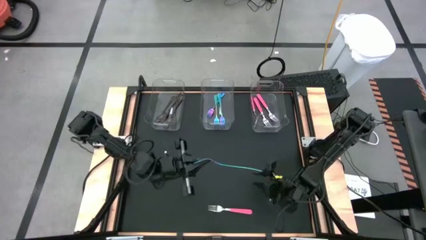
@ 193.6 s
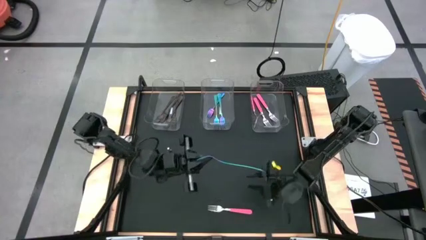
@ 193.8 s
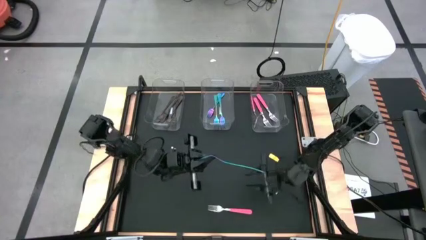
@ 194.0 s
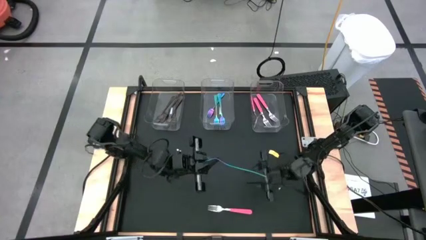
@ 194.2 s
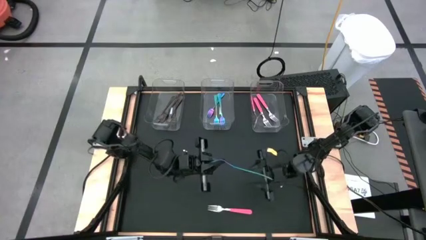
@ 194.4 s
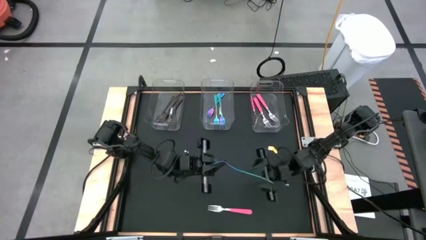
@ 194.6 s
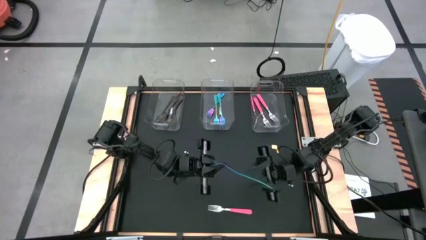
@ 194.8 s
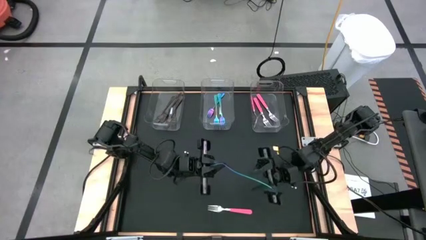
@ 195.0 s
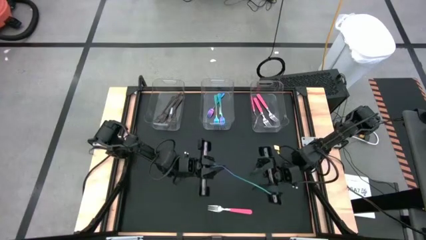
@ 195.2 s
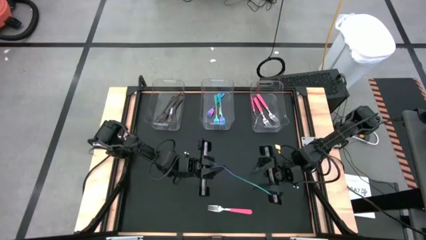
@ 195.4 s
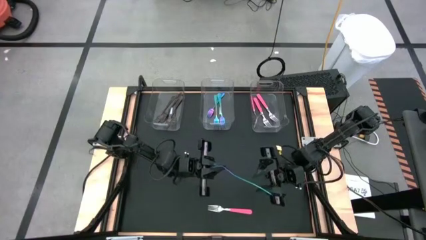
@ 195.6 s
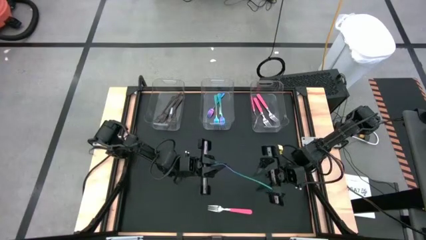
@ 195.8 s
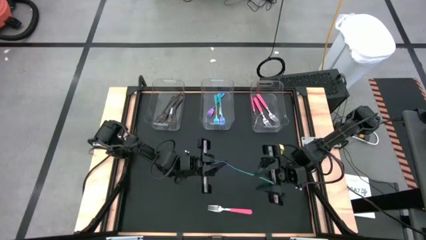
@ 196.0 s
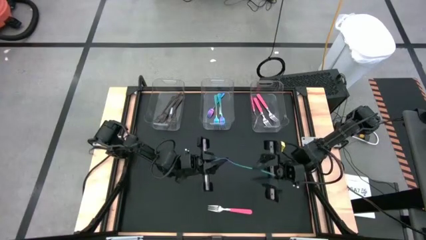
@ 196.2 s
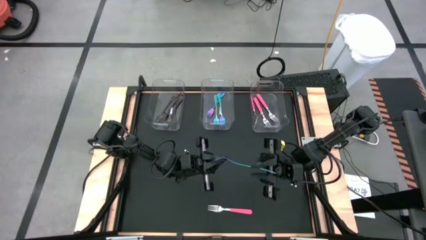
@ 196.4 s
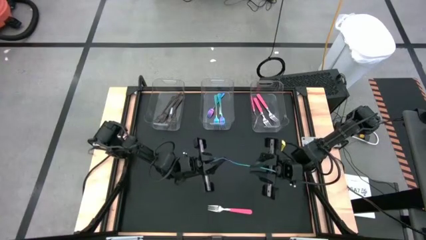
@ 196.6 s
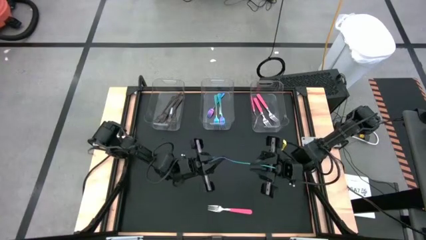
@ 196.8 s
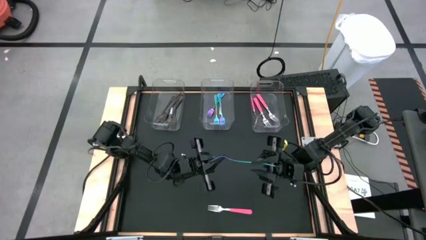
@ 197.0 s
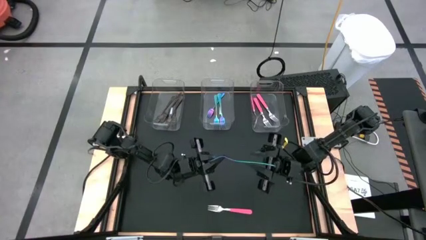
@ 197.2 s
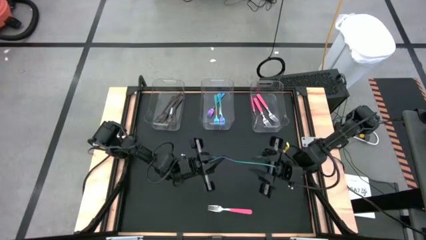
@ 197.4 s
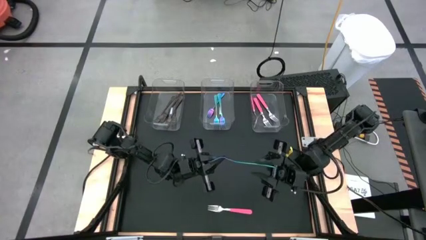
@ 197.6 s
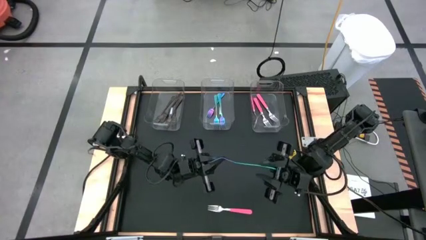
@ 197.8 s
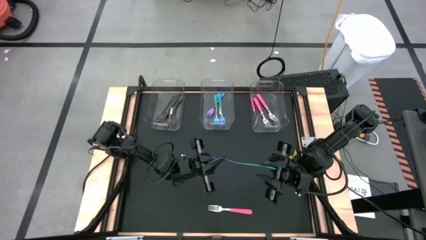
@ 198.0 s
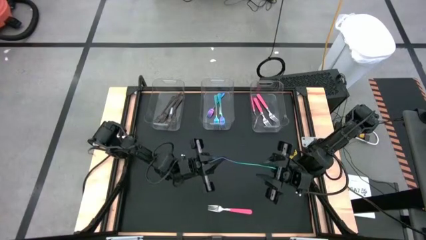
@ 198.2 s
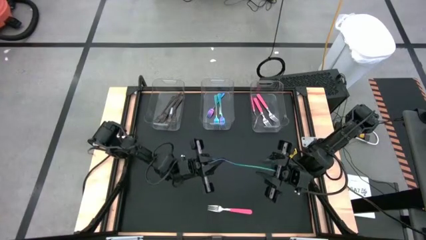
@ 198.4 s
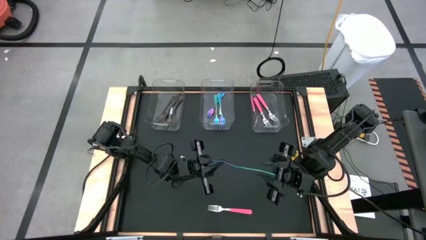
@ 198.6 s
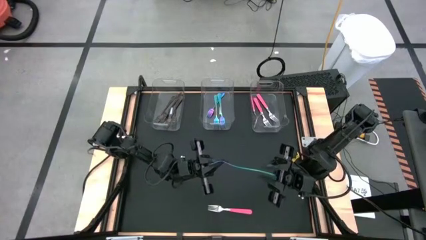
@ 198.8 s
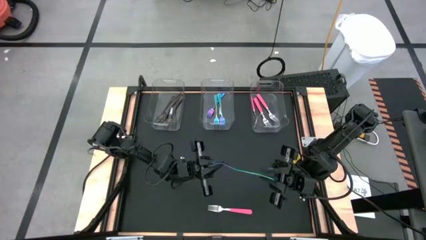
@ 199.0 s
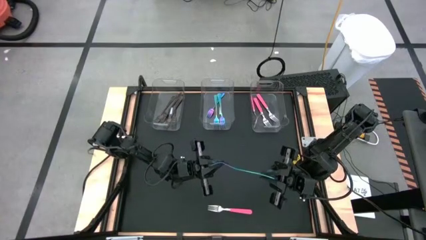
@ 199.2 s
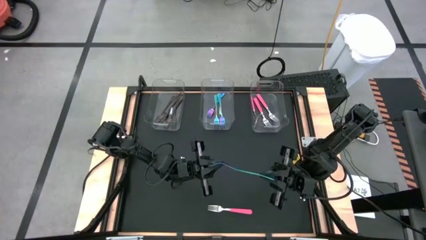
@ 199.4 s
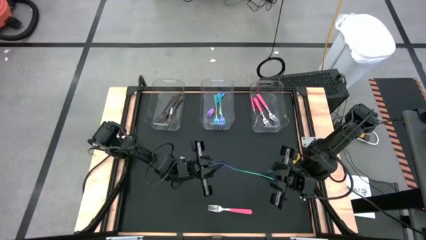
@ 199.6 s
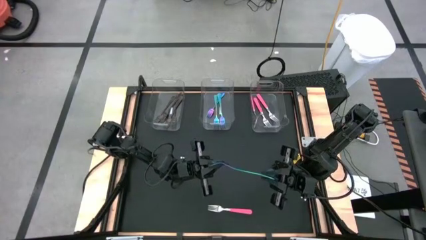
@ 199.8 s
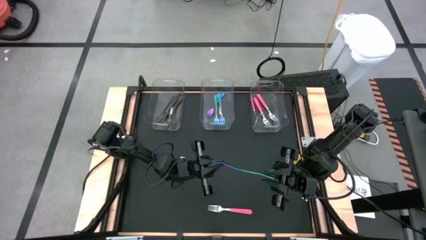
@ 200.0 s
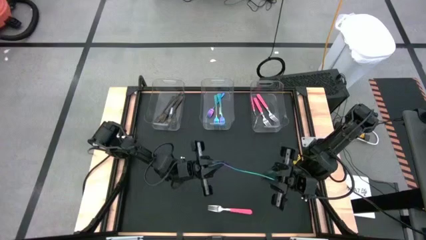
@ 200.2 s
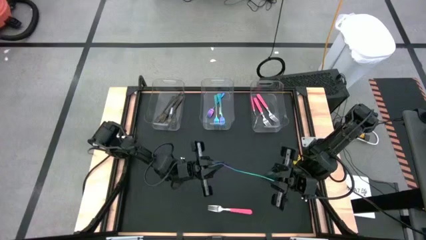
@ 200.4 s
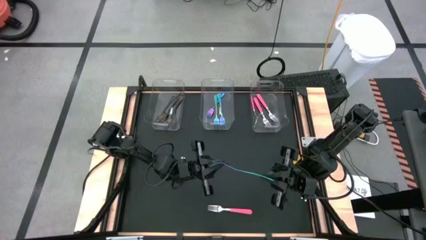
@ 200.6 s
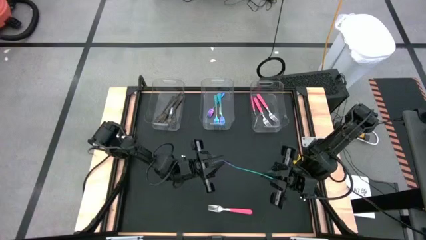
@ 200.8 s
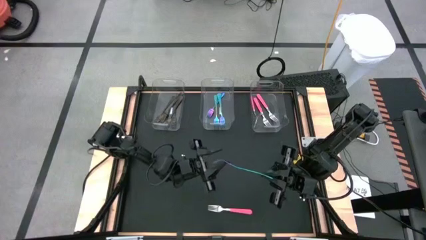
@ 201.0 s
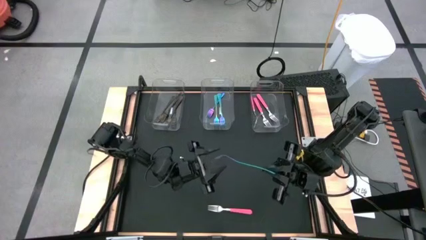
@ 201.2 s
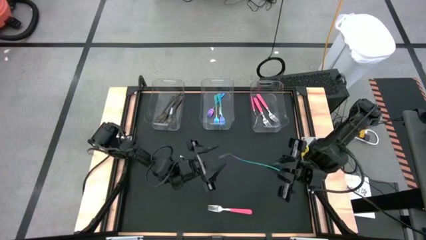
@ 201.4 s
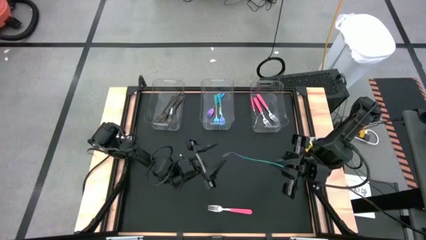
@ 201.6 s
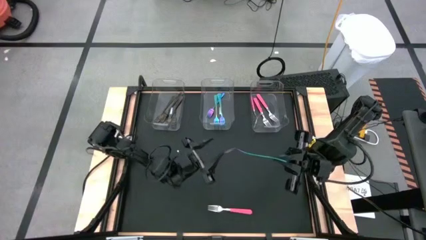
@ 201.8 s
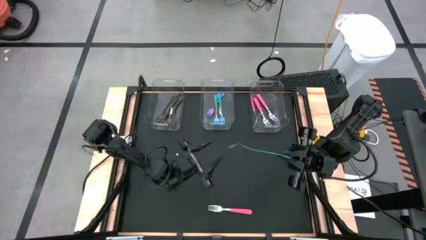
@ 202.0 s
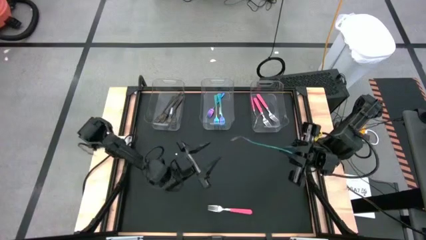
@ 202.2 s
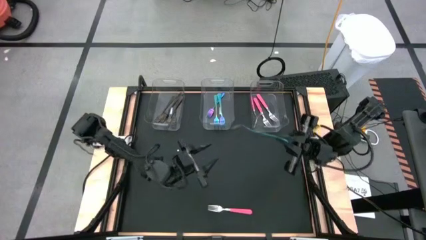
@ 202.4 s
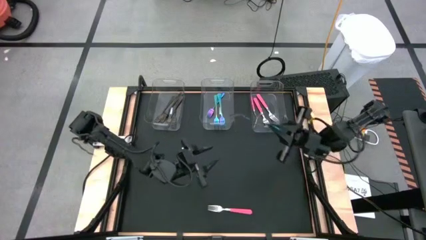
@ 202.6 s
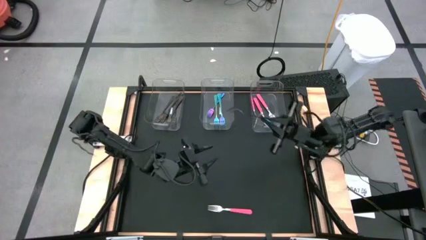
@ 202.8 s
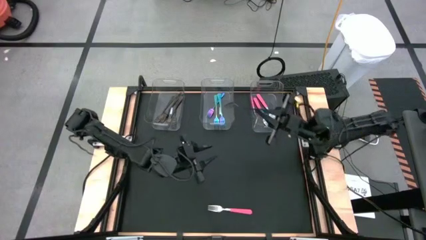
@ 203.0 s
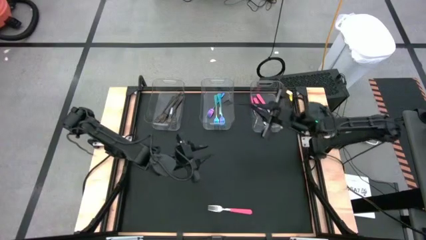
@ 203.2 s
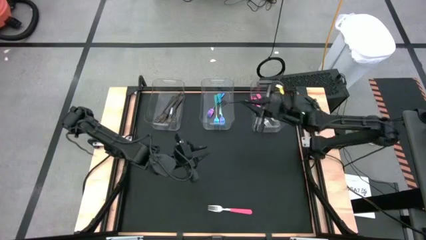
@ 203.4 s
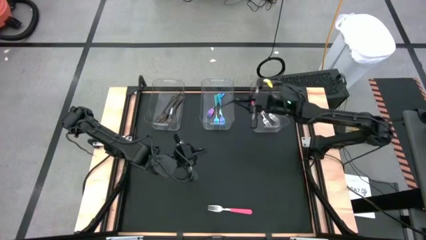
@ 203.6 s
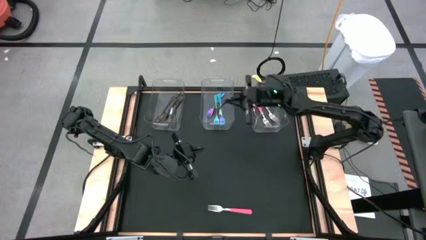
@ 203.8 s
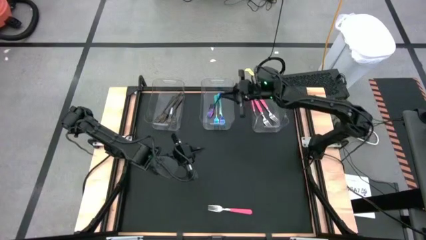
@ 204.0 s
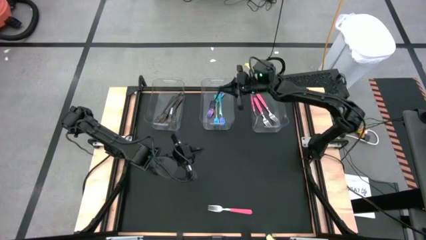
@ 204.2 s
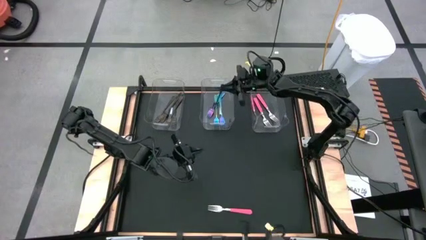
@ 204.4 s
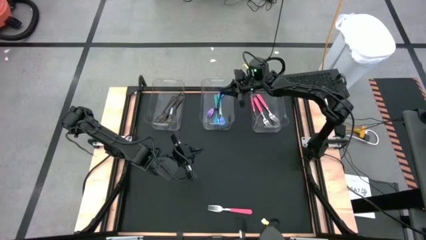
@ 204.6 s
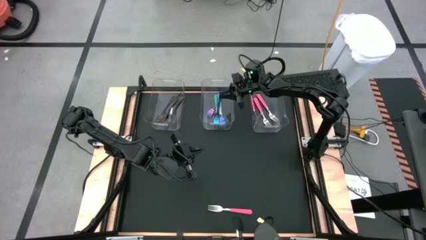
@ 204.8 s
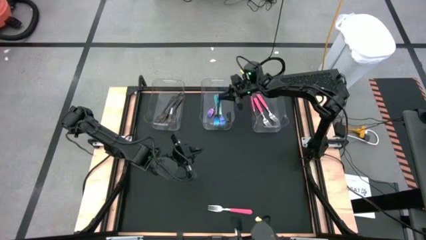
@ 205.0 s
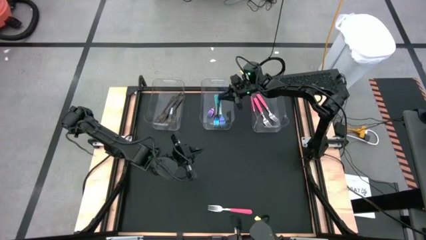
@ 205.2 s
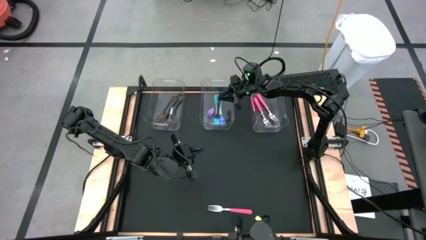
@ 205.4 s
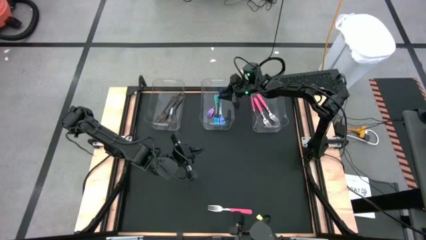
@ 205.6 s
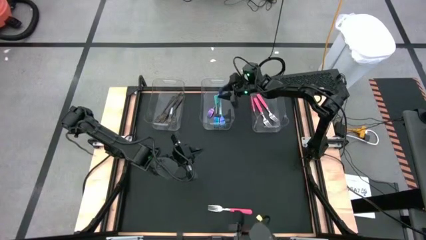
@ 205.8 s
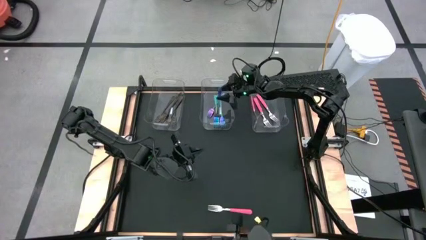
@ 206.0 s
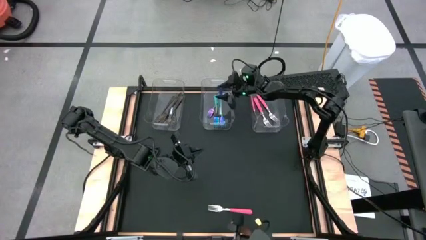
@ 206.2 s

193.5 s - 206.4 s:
Task: Sort silverware by color (type)
Put the blue fork into the middle transparent bin

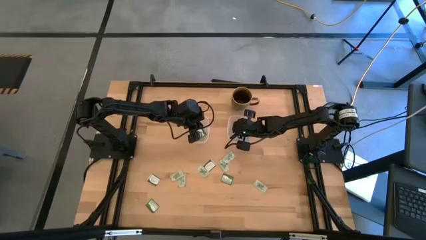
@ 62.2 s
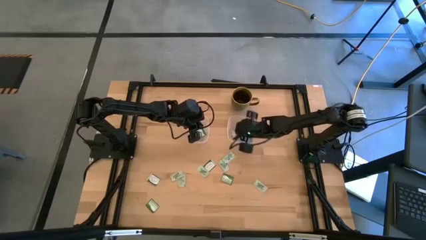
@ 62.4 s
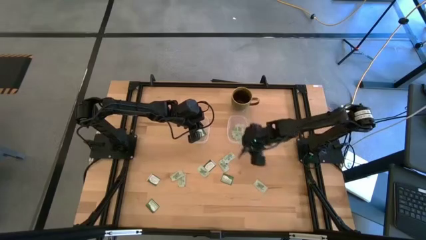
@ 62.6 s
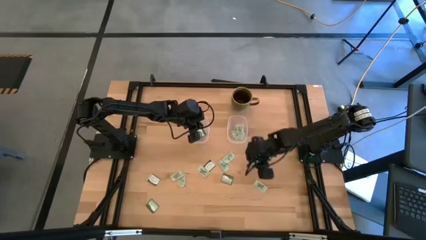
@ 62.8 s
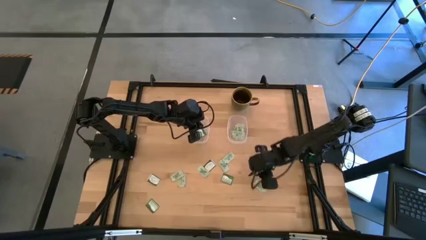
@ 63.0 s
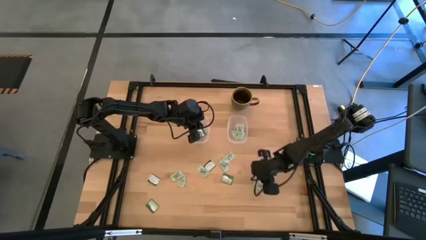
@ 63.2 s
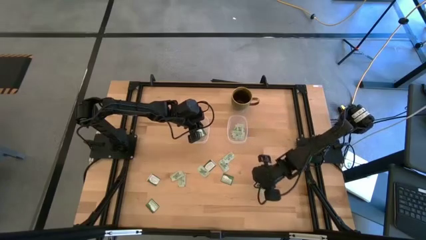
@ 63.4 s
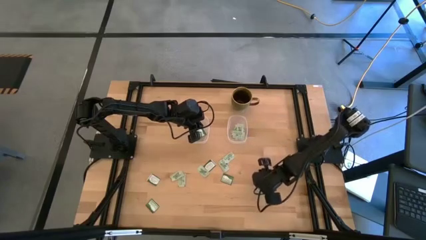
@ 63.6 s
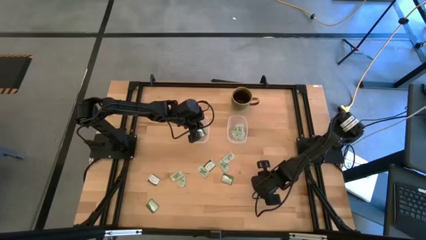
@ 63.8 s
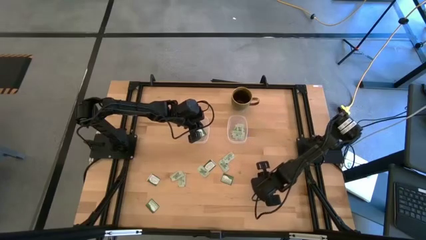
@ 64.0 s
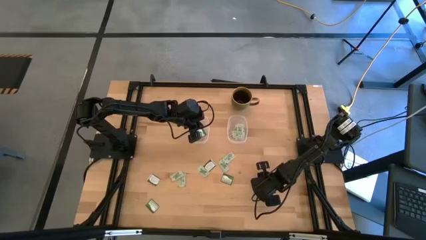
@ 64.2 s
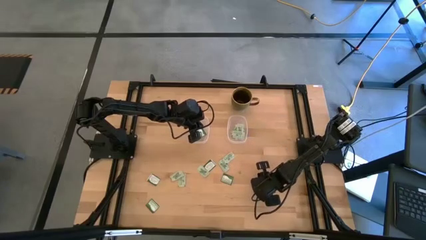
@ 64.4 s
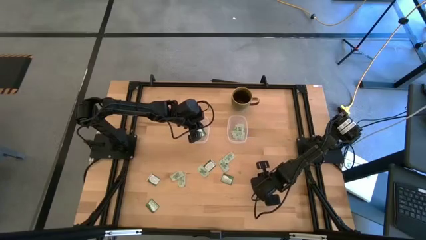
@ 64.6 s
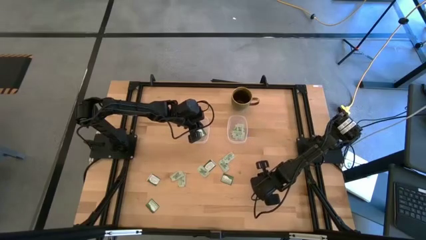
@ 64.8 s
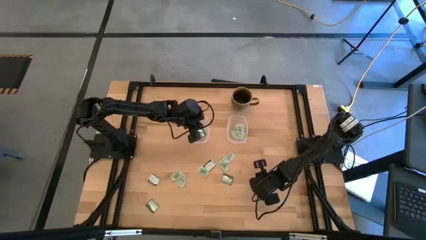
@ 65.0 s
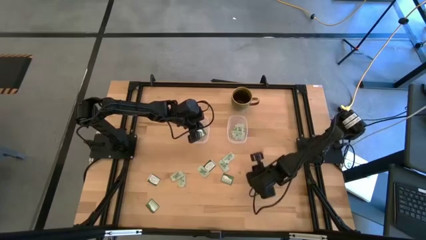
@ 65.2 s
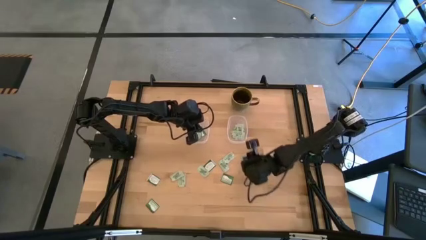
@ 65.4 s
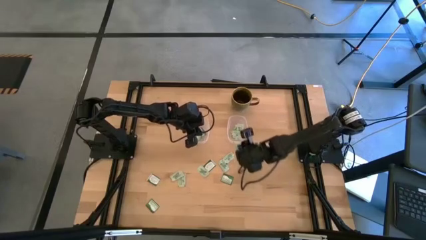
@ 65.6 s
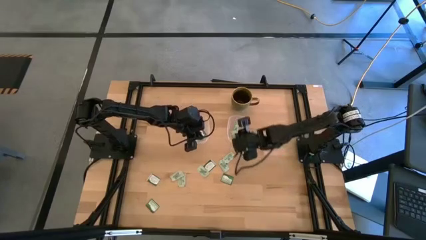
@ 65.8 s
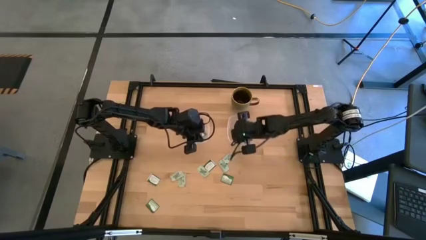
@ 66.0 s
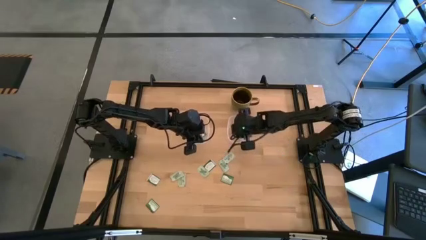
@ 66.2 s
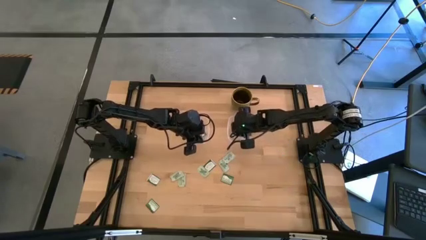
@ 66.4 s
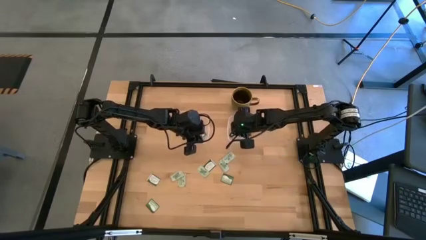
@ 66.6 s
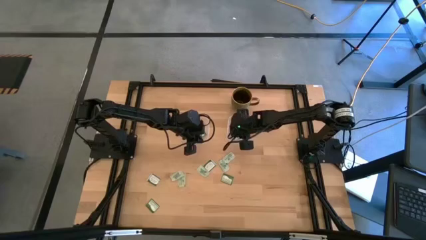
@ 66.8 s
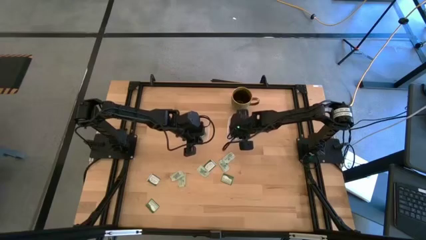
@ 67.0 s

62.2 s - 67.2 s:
Task: Pick and place items into bin
Put the stevia packet into the right transparent bin
